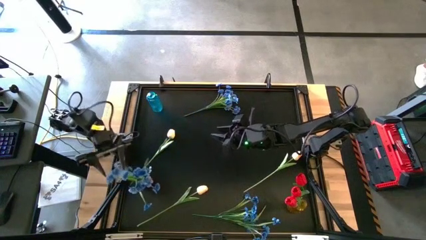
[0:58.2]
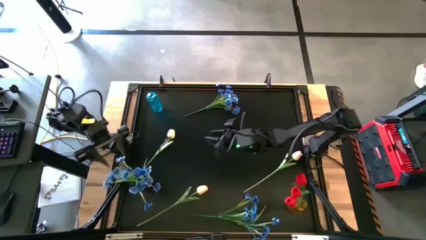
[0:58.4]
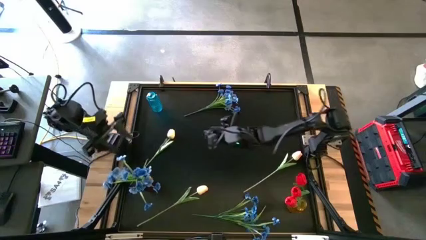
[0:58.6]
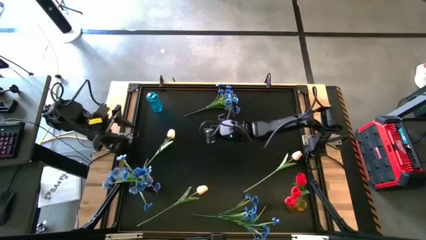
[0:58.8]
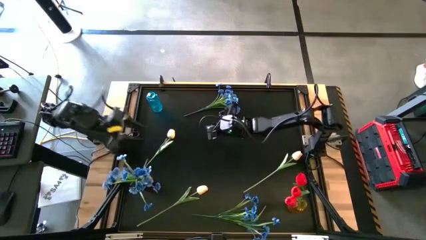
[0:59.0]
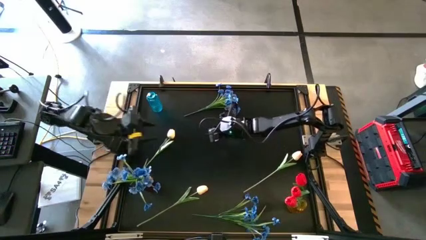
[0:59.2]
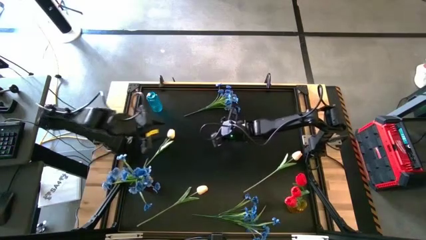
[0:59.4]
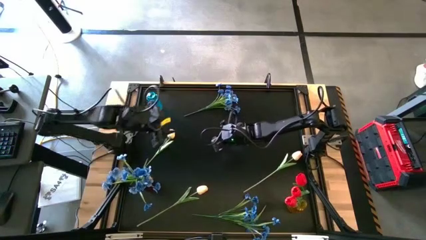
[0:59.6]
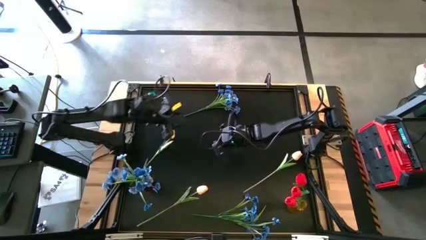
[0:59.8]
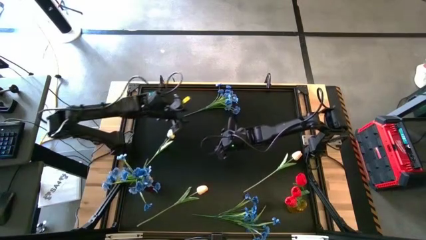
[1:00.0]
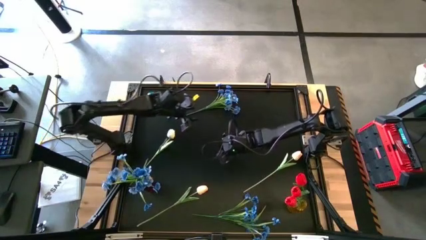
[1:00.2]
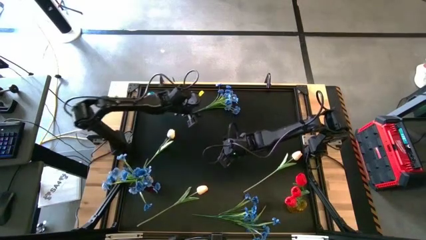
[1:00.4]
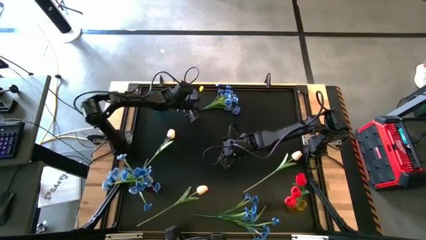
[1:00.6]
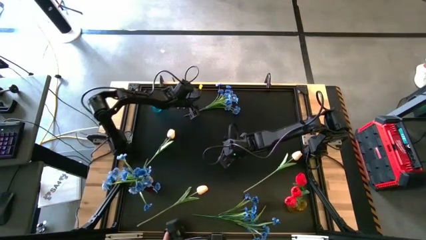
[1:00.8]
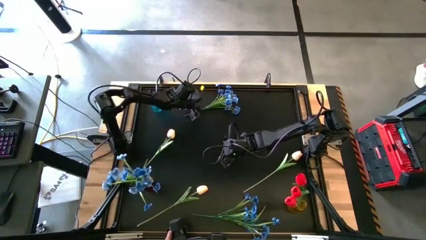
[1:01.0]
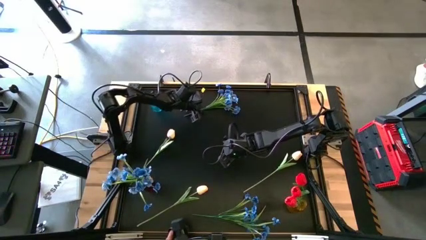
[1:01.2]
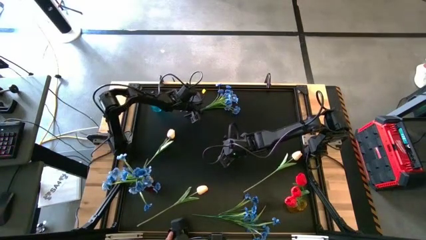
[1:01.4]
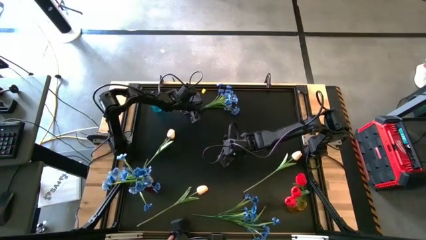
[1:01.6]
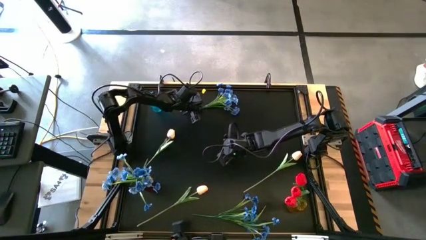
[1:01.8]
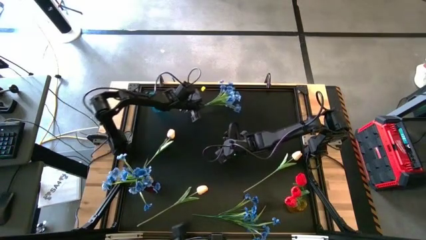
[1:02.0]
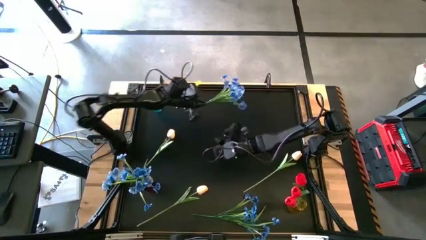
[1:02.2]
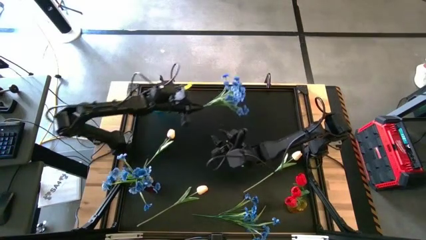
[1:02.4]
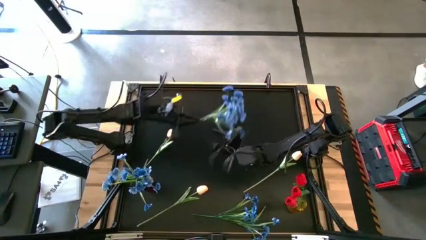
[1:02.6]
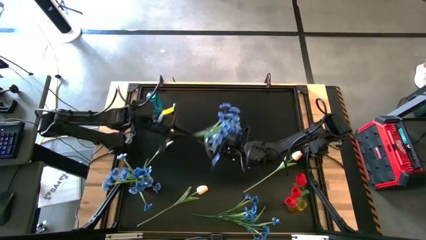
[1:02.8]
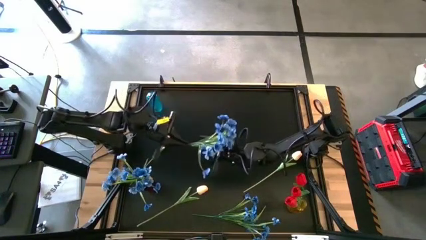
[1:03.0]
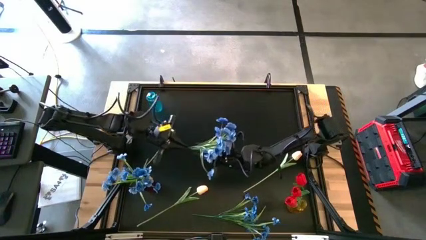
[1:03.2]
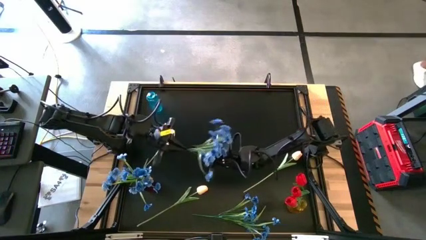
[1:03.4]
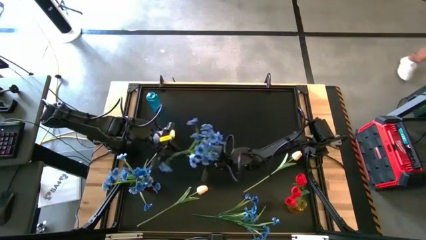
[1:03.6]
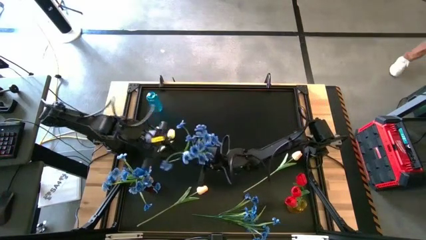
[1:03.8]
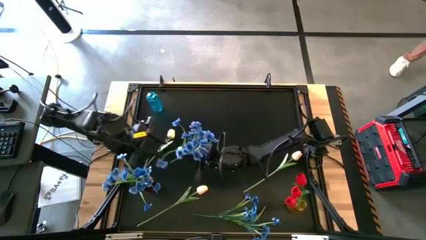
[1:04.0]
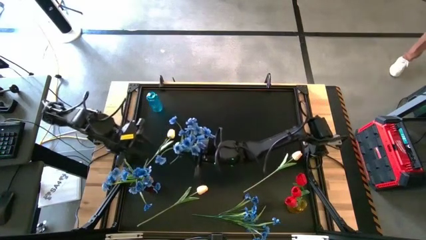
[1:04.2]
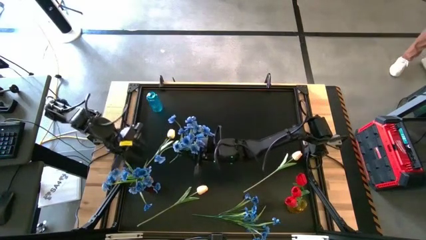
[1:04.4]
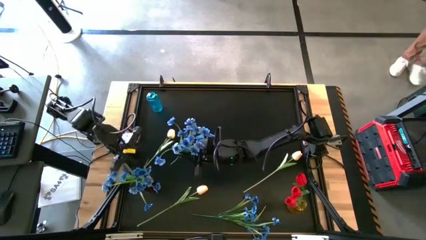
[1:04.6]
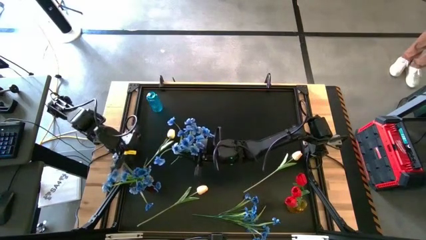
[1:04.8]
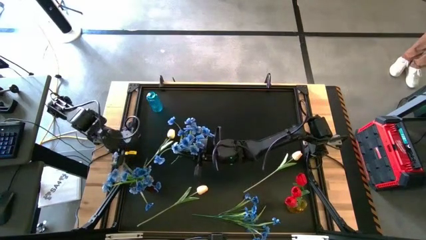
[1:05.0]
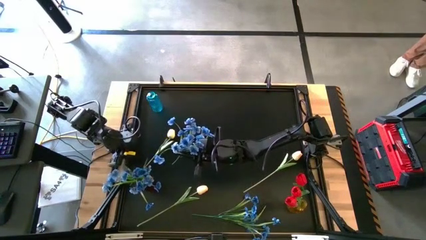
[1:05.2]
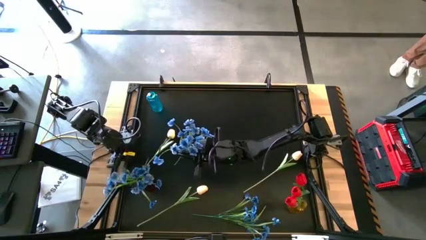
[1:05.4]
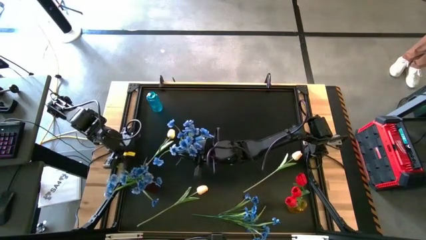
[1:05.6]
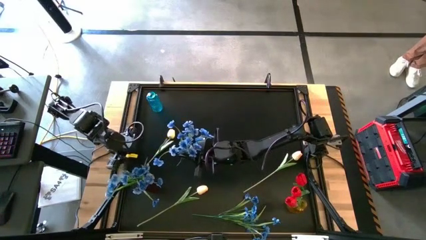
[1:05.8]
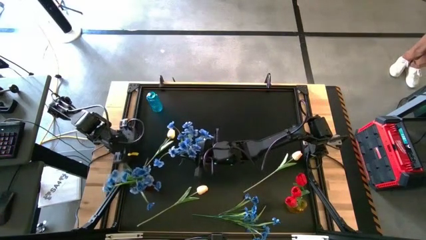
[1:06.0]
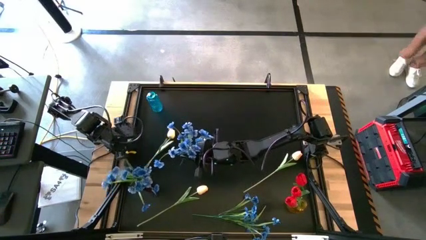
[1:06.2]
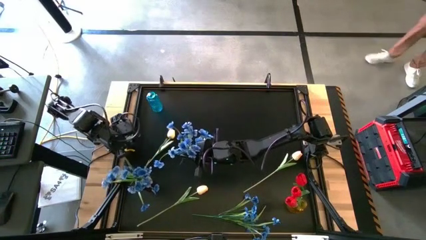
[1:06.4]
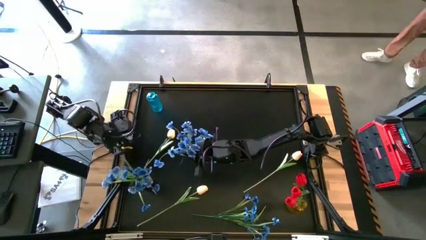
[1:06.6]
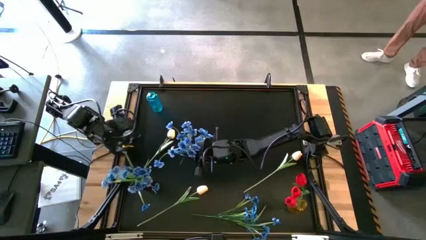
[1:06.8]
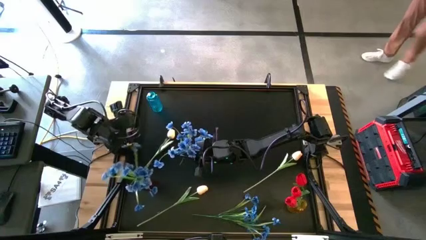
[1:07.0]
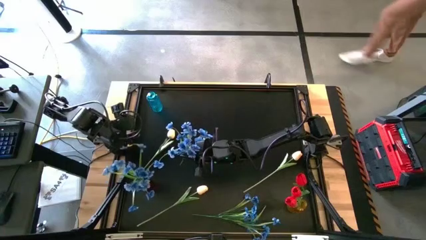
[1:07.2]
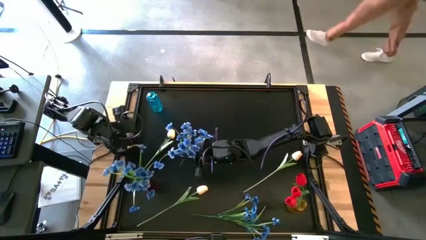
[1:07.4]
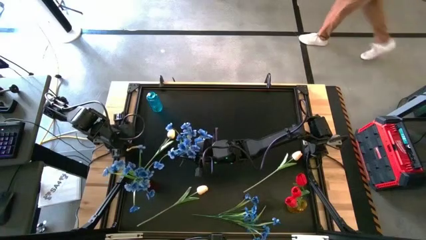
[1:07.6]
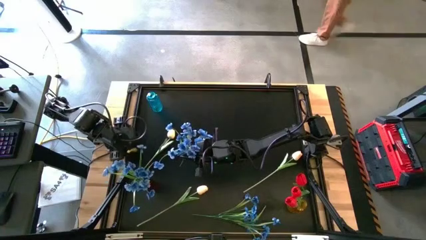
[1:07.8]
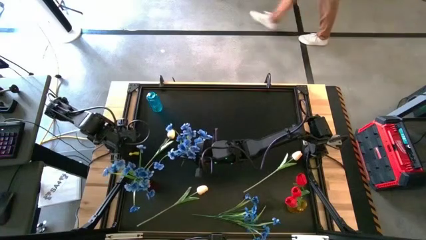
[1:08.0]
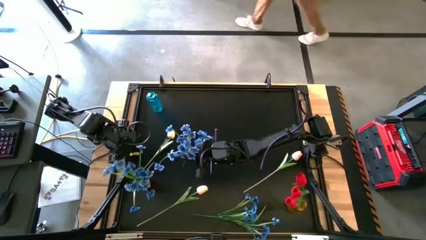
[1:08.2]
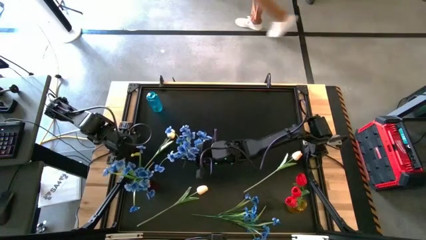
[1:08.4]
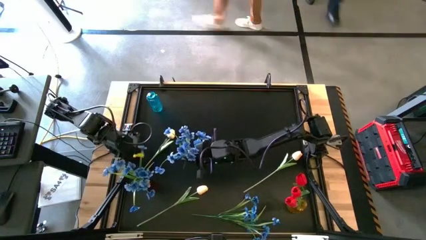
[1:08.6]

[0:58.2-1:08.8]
Task: Sort flowers into vase by color
Put the top blue flowers into the red vase

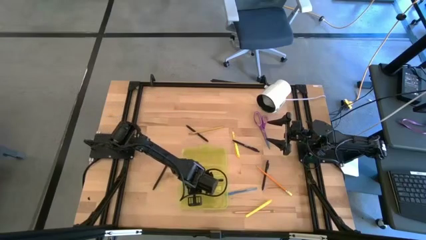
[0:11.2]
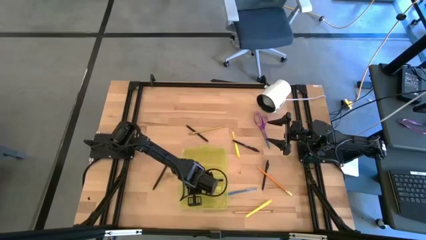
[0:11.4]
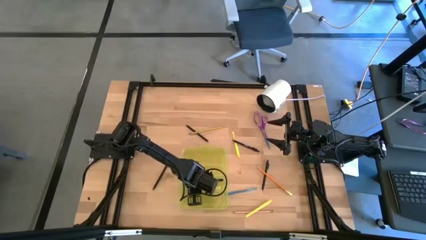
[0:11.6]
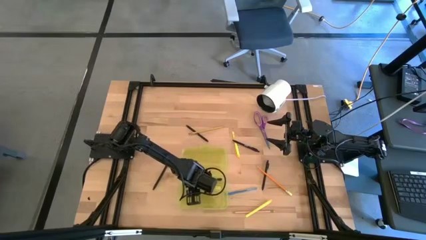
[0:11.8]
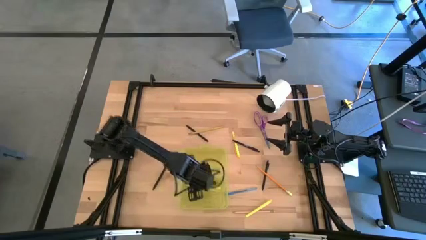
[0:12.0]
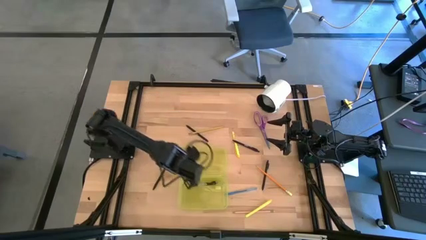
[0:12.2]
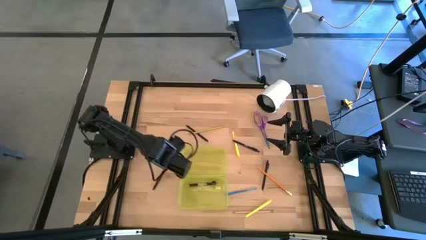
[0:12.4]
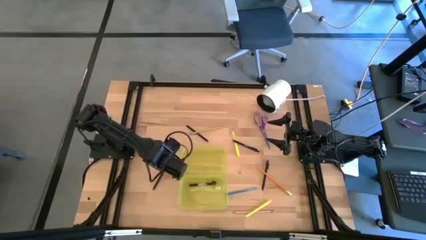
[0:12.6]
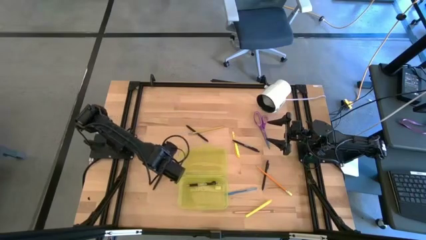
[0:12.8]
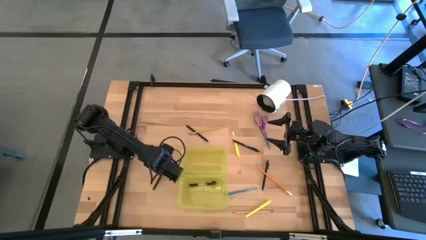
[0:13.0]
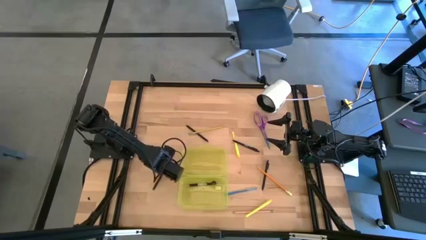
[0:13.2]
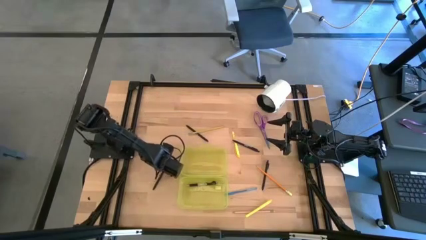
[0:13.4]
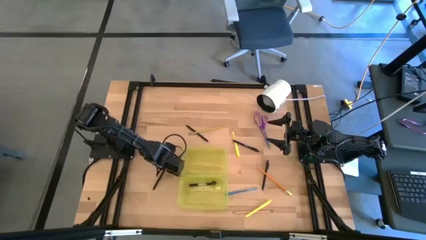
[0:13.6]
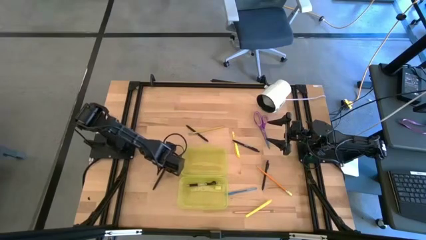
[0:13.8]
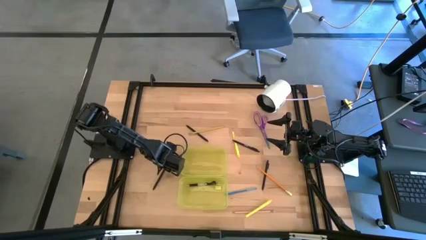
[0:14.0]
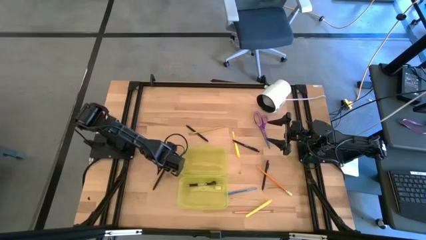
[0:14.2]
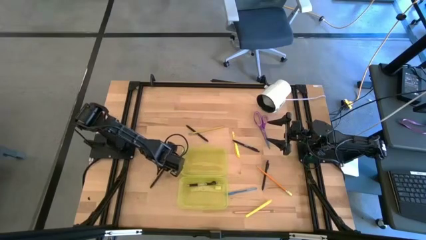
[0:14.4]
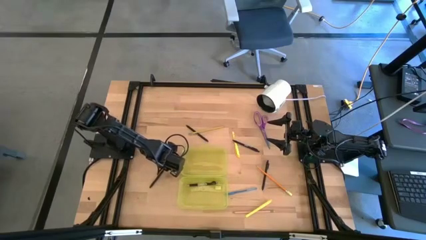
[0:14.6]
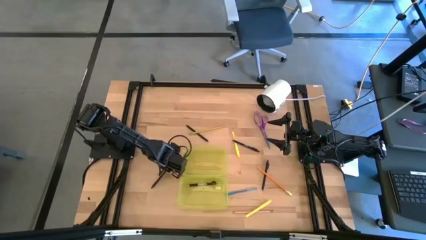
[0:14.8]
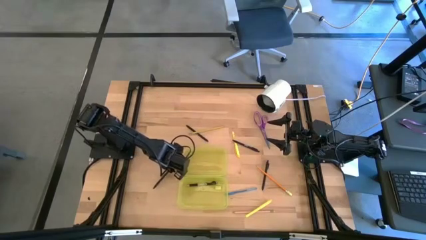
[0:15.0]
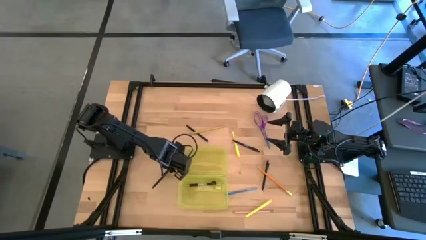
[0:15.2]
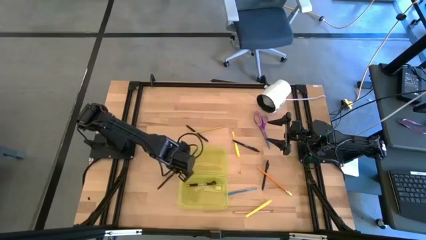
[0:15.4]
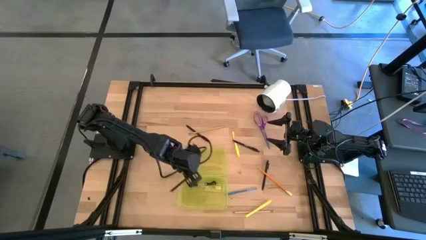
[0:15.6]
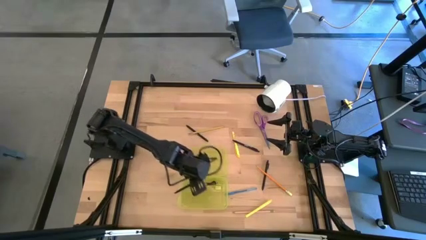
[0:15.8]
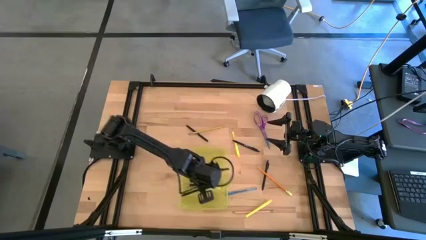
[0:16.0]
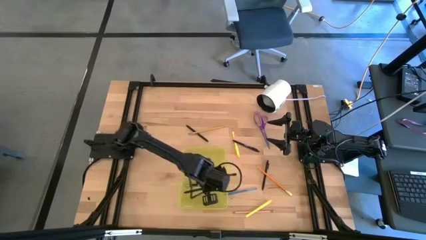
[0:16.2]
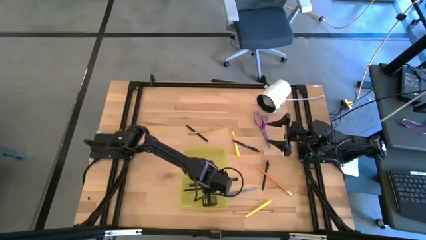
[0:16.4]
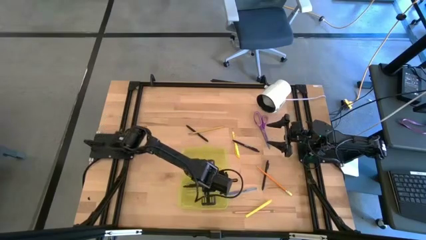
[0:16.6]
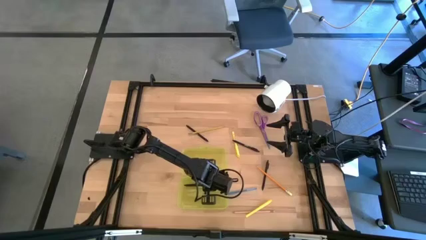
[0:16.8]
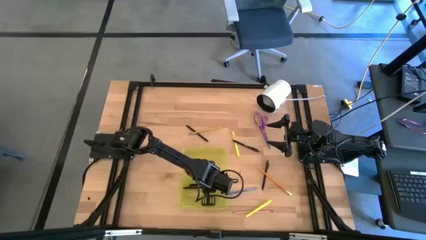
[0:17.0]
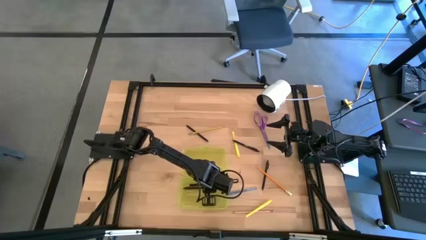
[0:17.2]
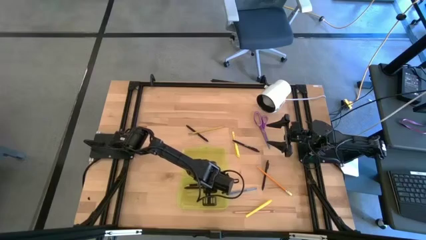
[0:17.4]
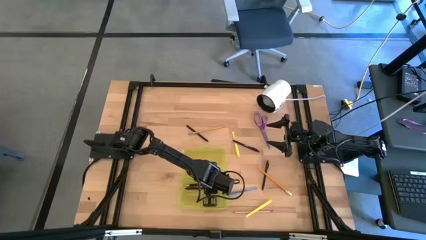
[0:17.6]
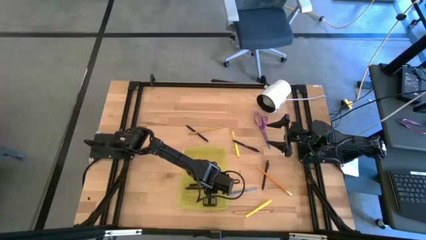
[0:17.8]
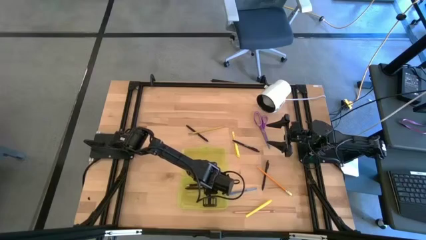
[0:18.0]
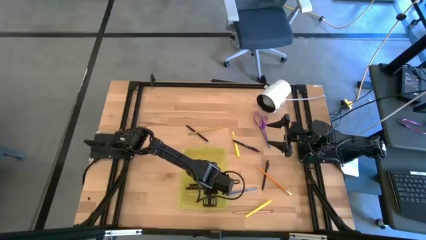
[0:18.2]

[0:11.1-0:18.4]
Task: Pick & place school supplies into a supply box
Put the black pen into the yellow supplies box
